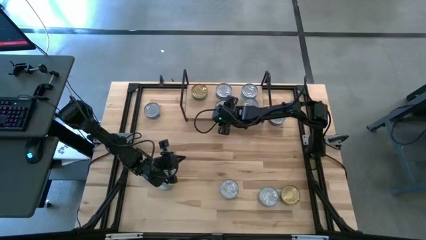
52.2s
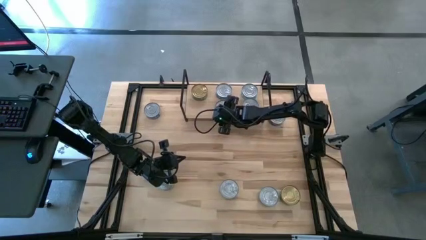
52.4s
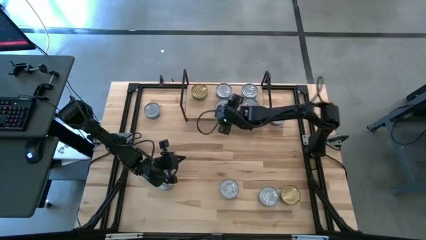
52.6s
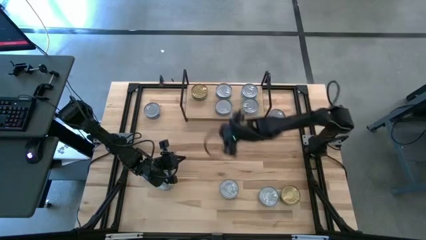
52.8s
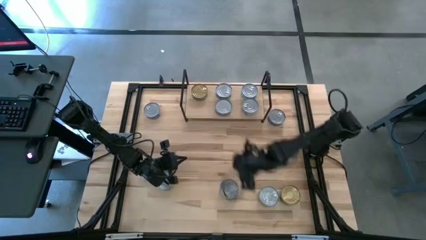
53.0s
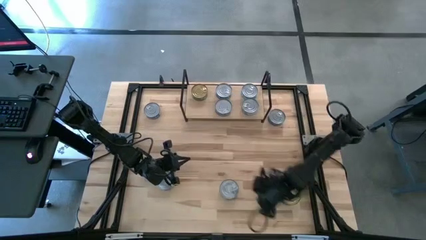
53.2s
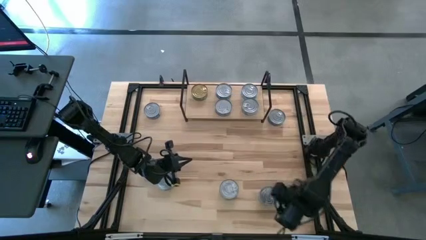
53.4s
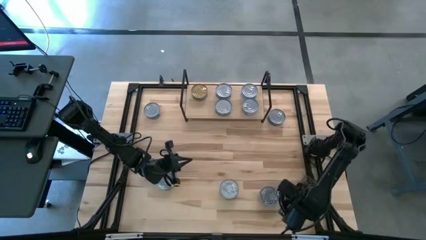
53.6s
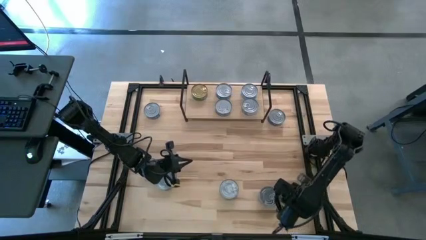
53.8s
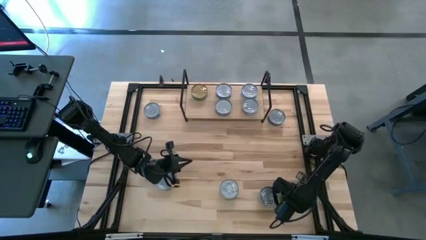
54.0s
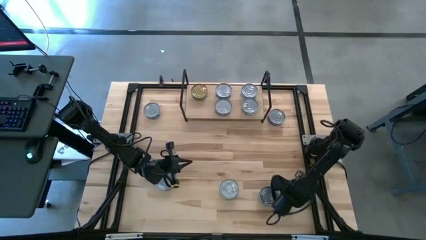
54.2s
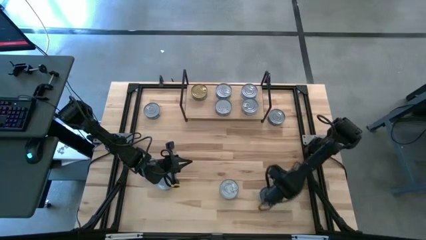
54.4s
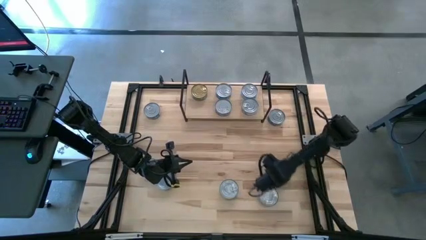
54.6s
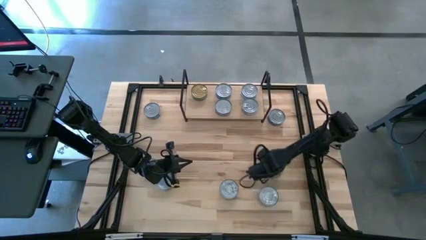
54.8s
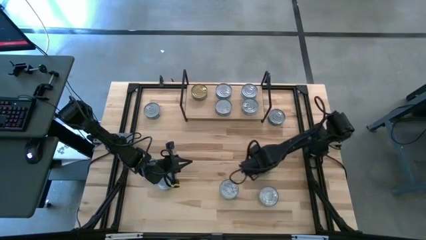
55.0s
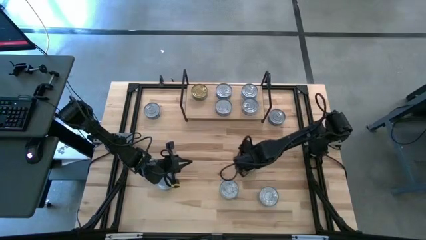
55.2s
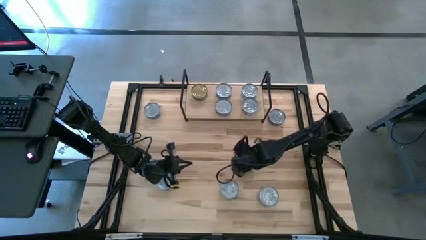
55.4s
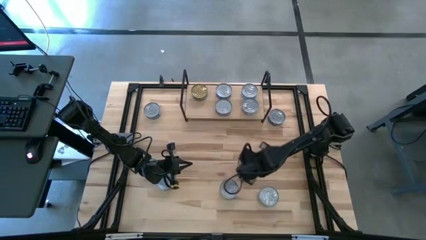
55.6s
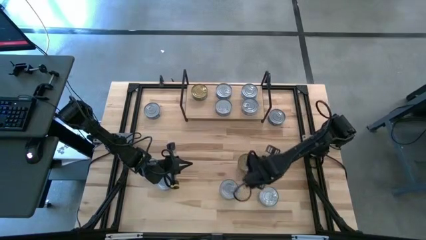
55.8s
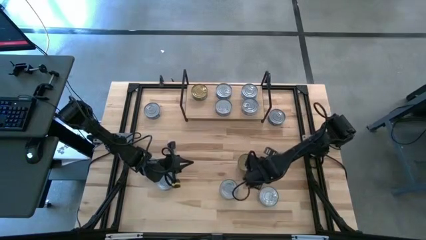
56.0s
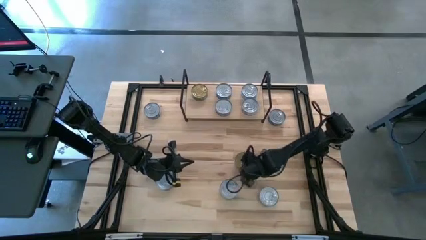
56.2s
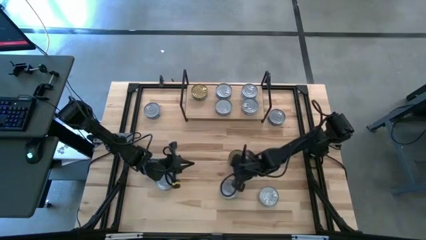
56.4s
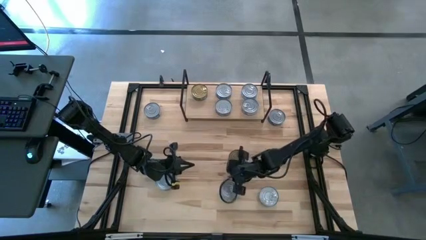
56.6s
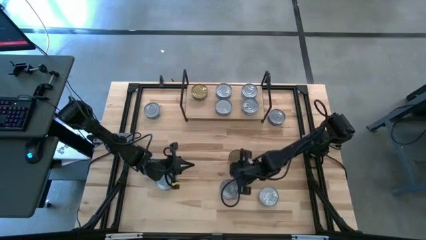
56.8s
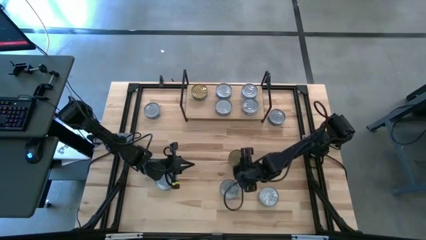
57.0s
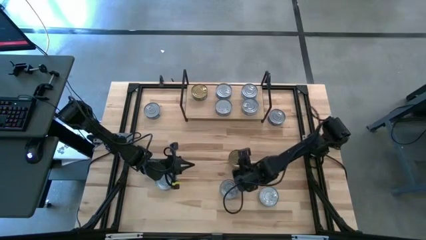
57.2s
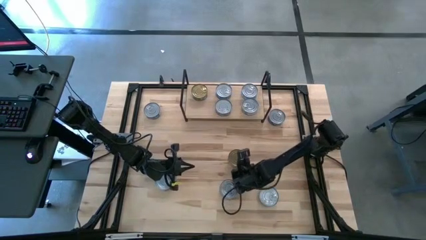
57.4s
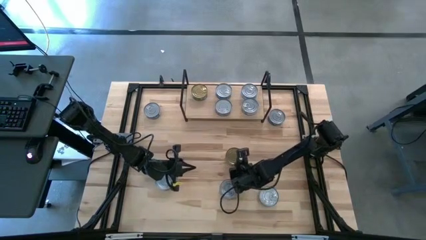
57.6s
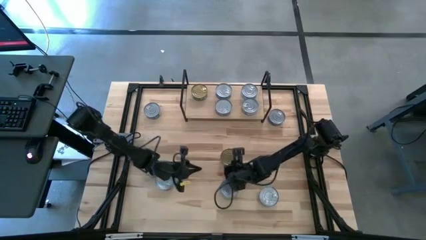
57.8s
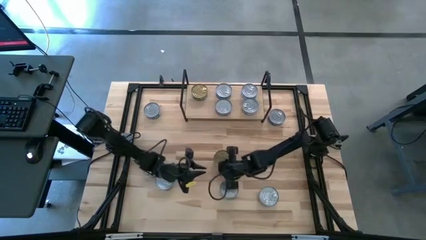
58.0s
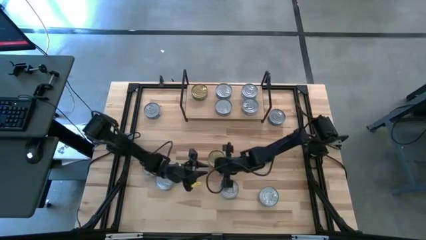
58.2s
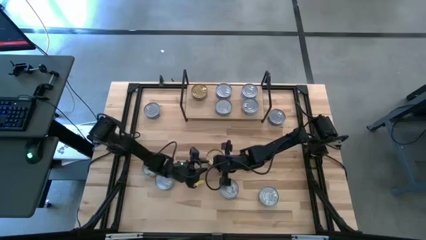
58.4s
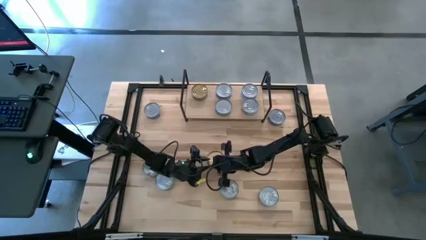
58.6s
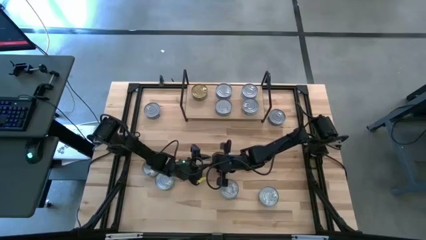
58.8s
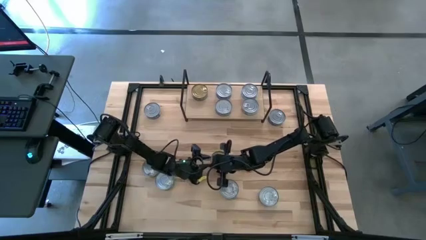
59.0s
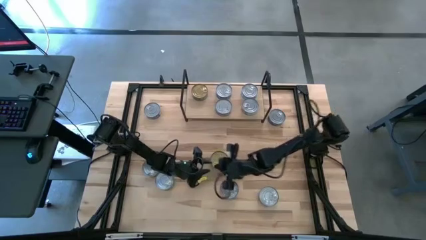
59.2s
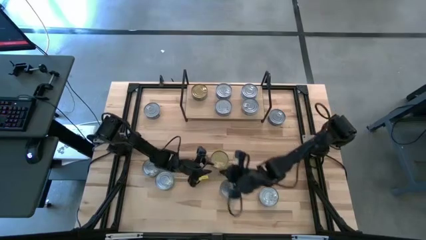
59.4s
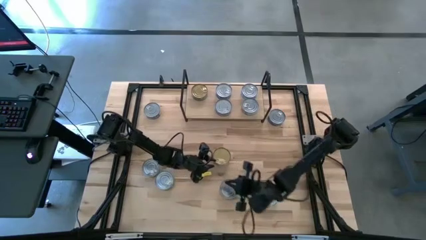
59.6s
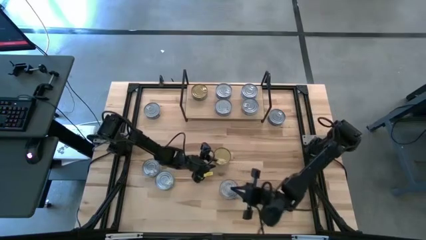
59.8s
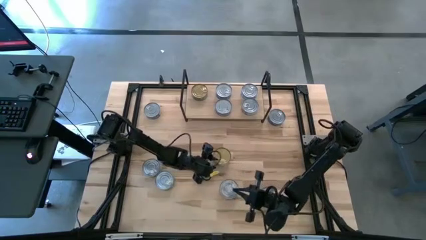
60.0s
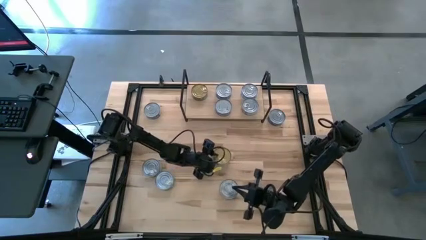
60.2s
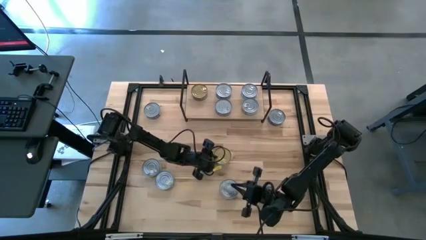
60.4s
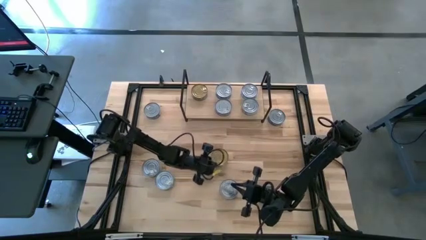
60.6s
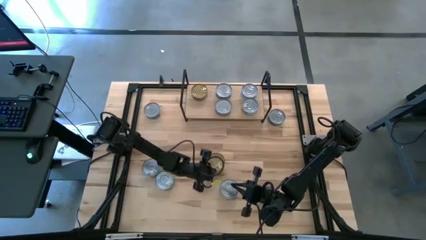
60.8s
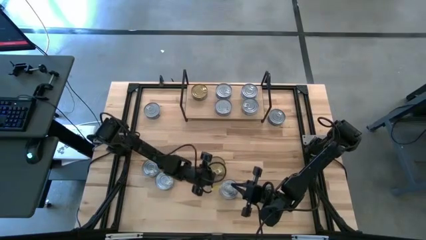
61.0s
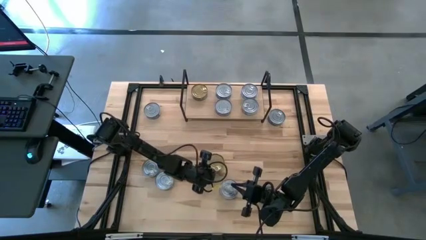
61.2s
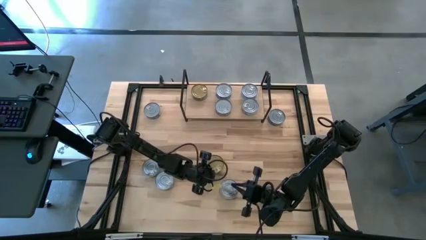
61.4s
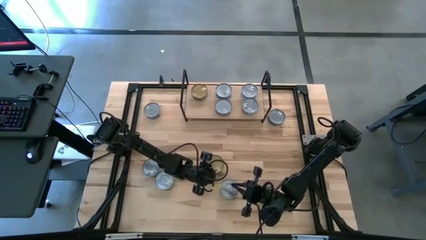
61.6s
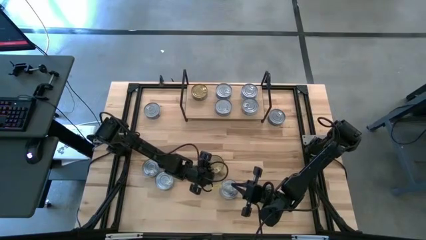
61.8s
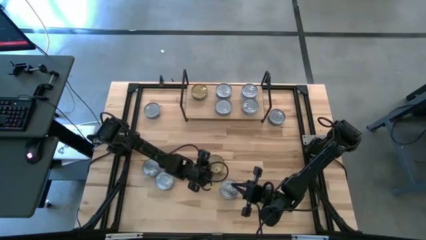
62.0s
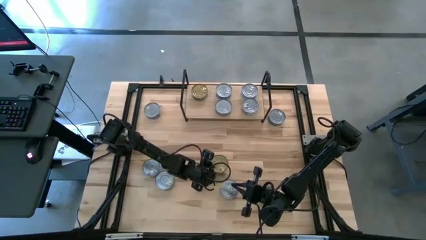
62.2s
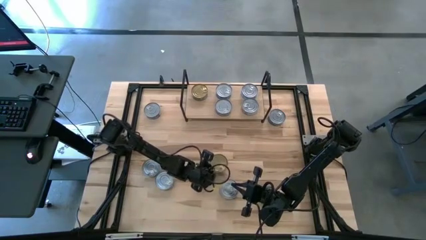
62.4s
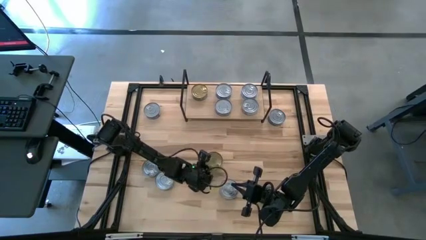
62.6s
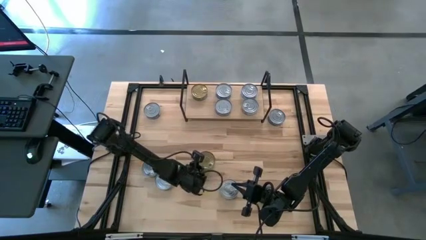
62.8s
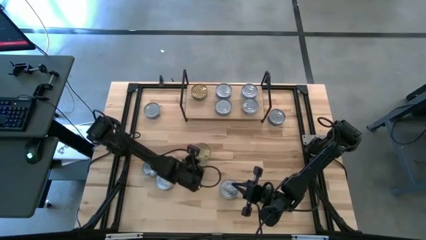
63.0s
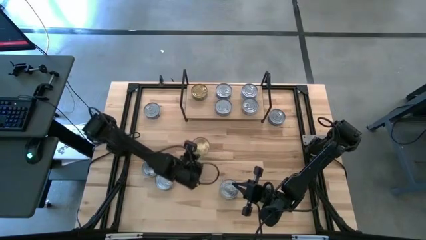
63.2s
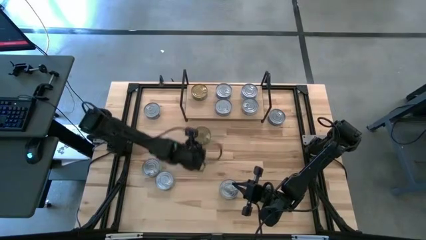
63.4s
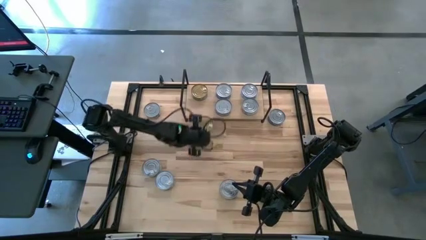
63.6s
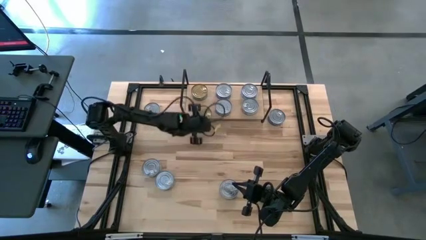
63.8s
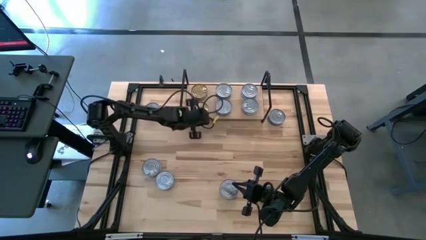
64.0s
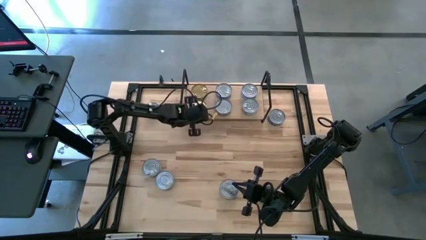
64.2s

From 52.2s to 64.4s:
Task: Stack canned seafood by type on shelf
Put the green tuna can on the shelf

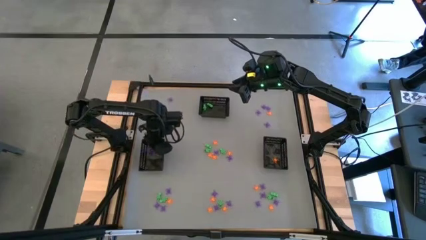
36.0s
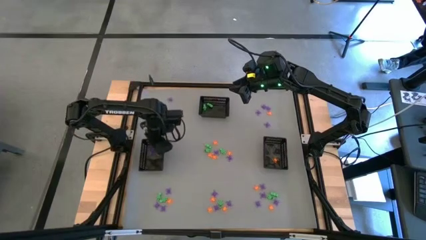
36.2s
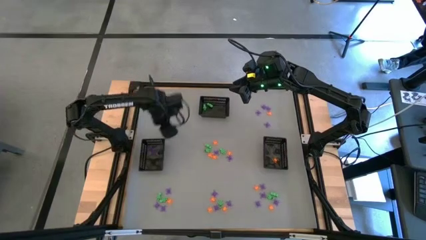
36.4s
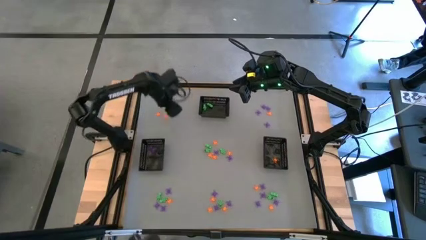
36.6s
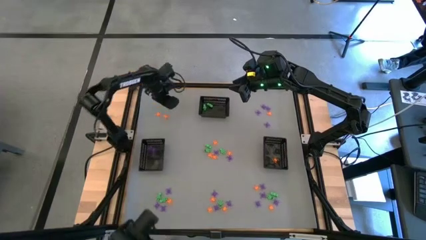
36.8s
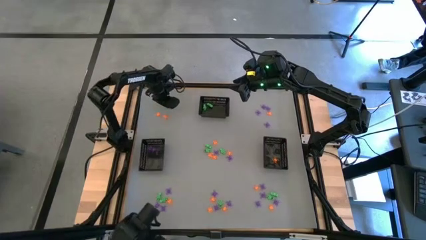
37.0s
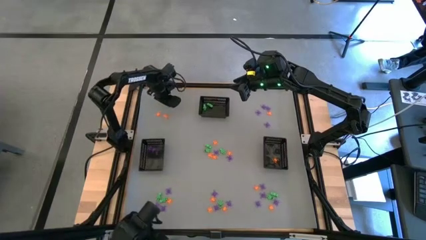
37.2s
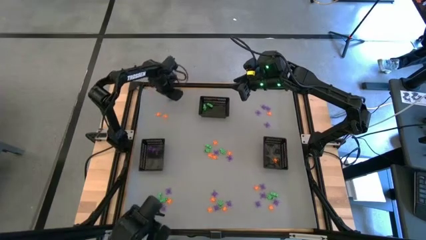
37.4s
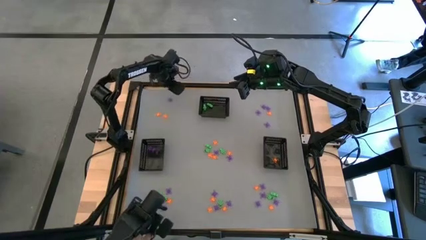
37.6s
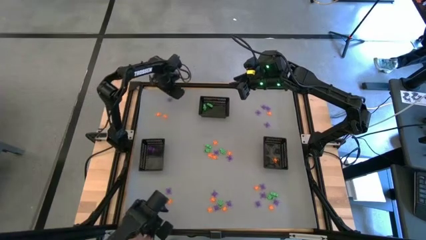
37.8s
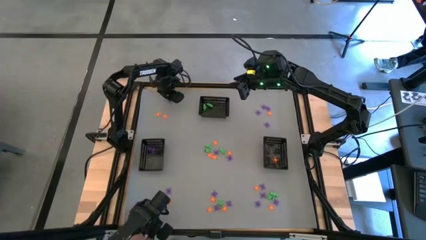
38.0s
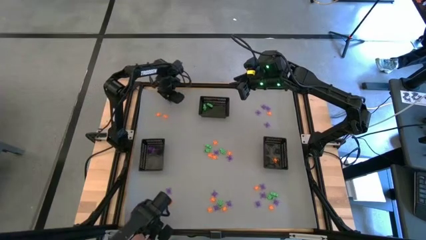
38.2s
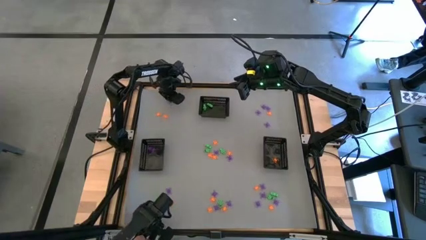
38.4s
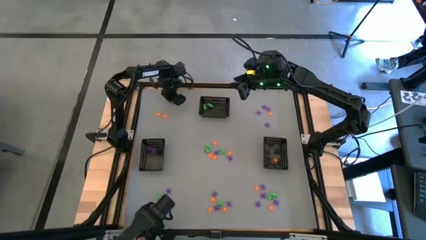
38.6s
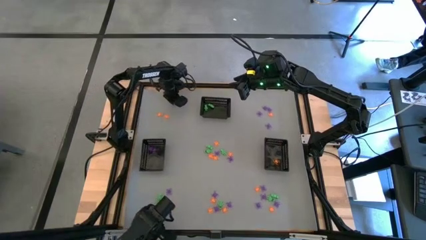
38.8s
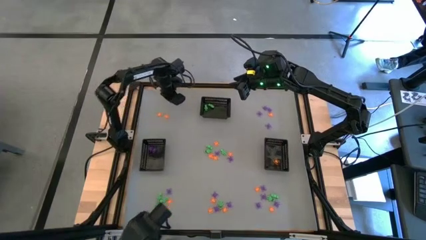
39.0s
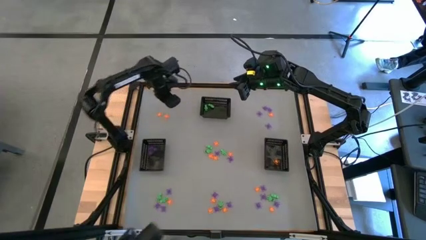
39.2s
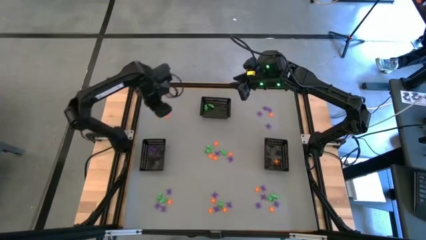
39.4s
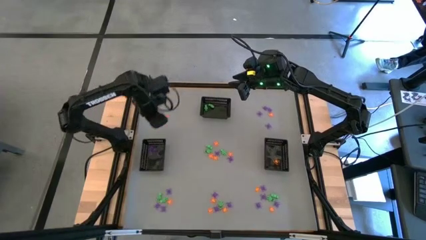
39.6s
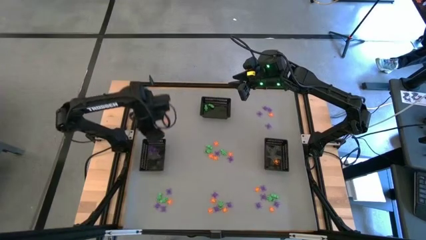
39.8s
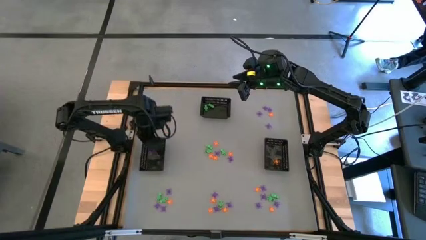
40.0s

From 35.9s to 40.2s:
Task: Sort Halloween decoration
Put the violet spider toy into the left bin
